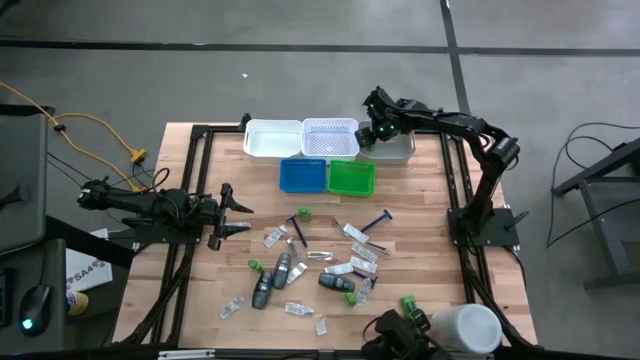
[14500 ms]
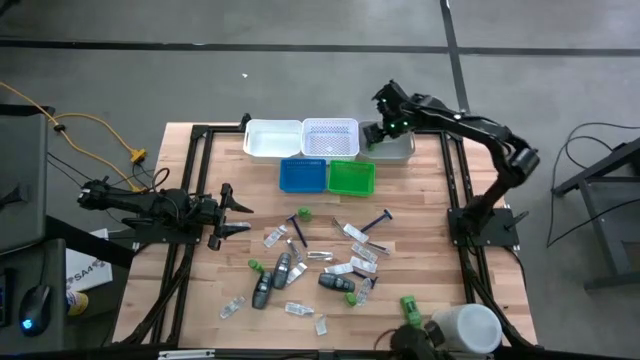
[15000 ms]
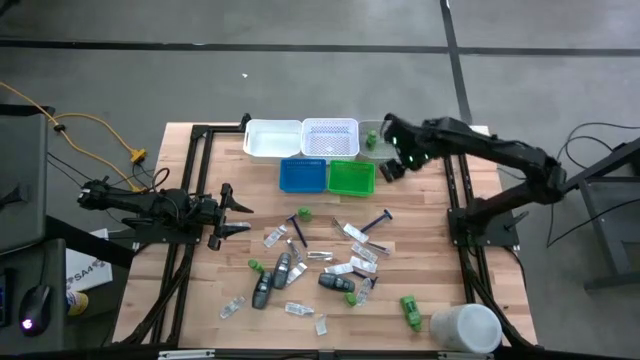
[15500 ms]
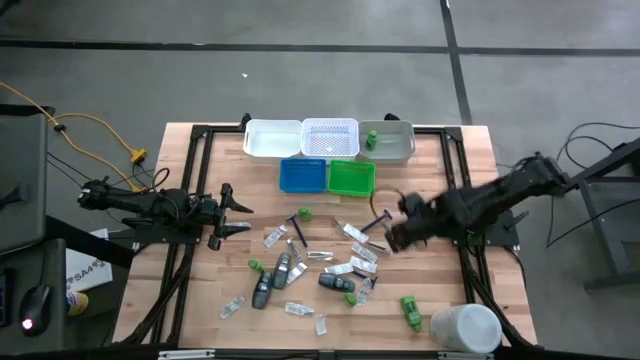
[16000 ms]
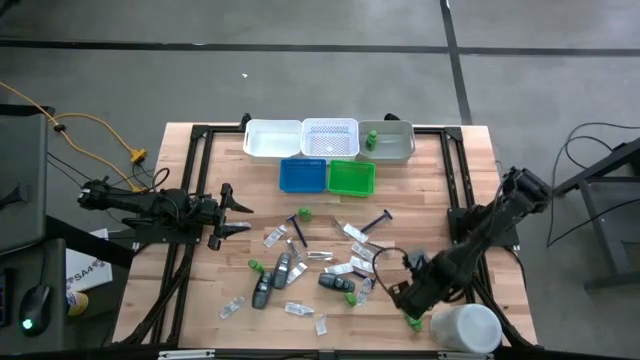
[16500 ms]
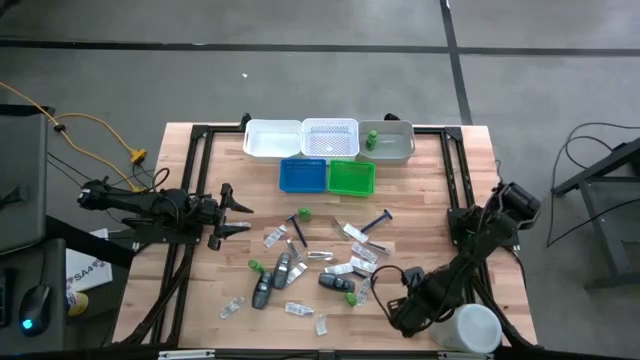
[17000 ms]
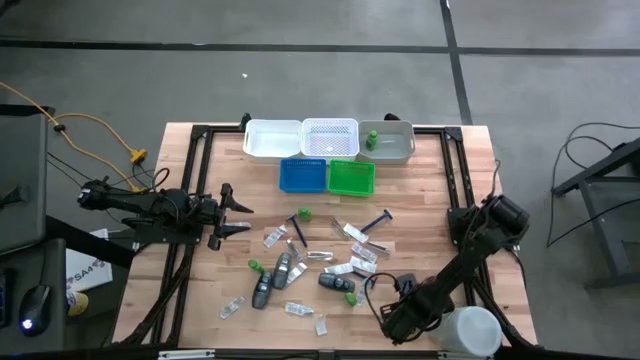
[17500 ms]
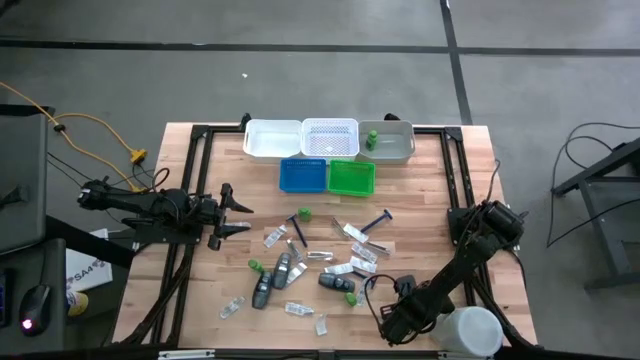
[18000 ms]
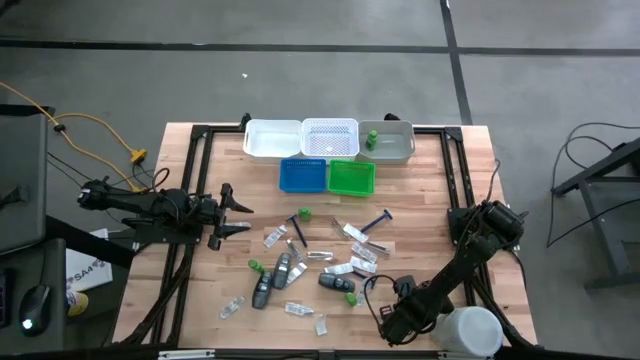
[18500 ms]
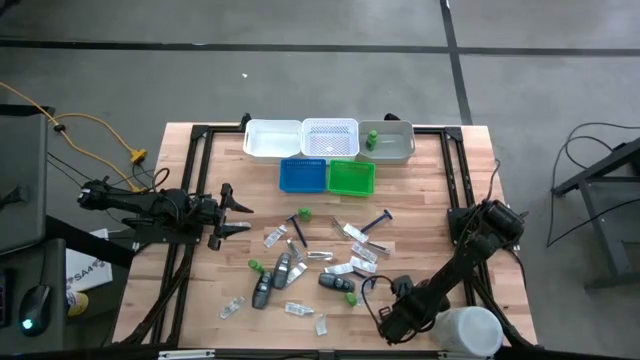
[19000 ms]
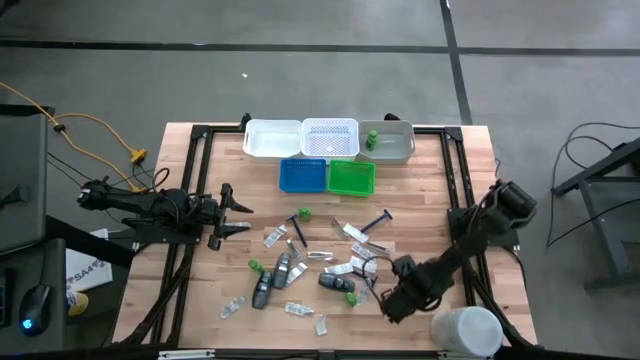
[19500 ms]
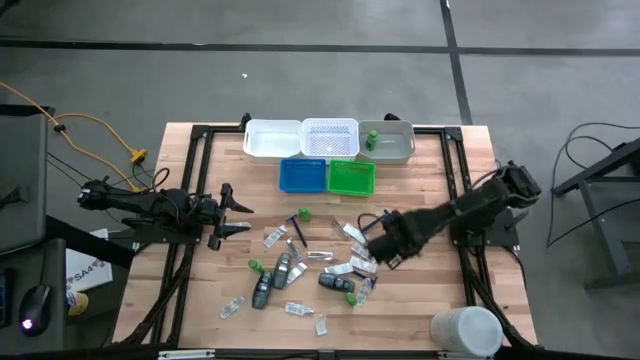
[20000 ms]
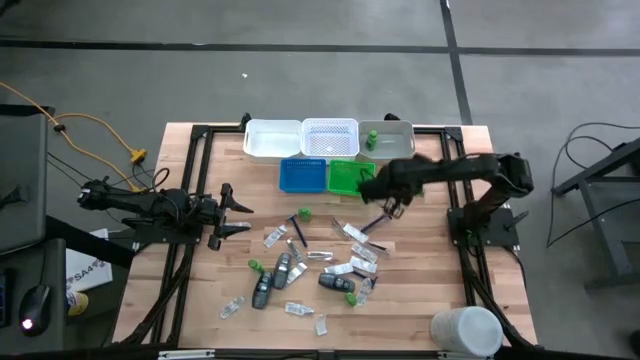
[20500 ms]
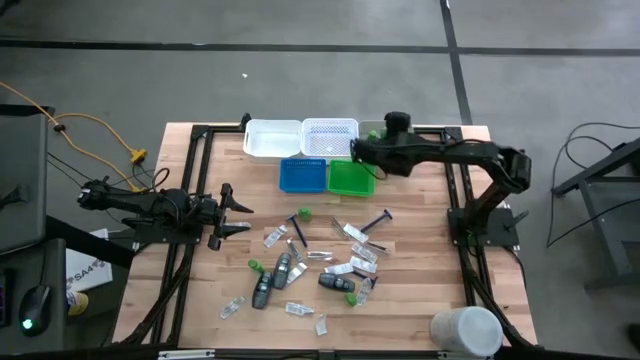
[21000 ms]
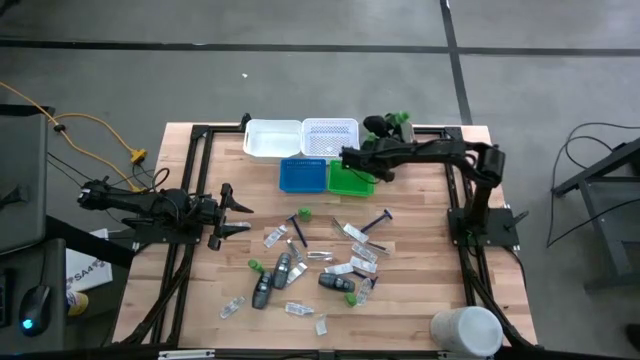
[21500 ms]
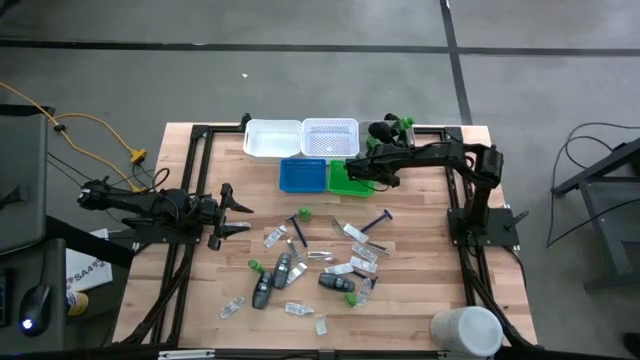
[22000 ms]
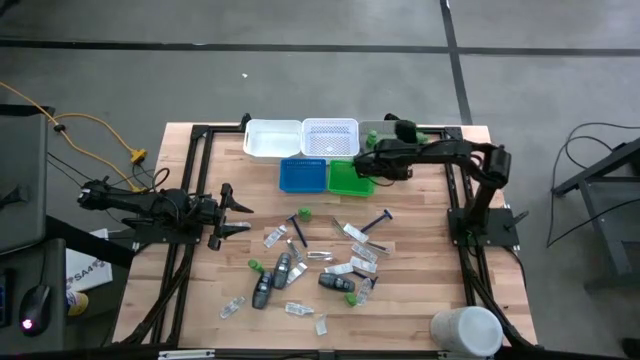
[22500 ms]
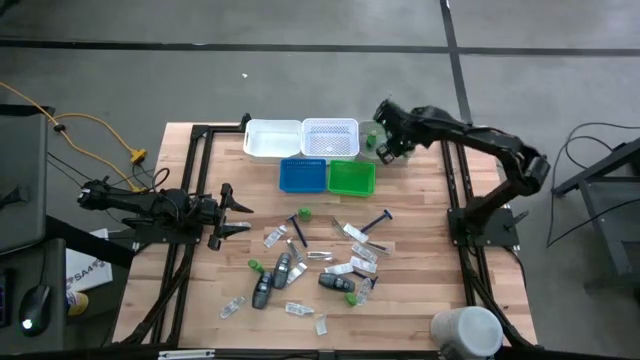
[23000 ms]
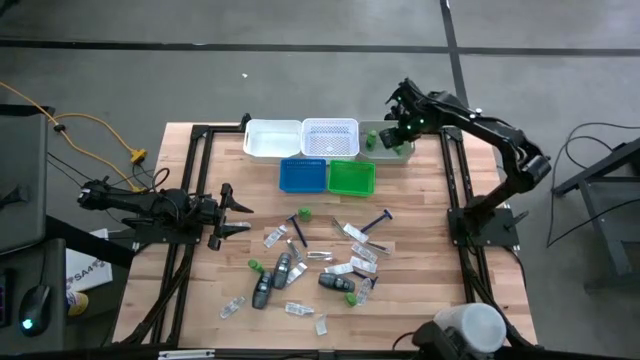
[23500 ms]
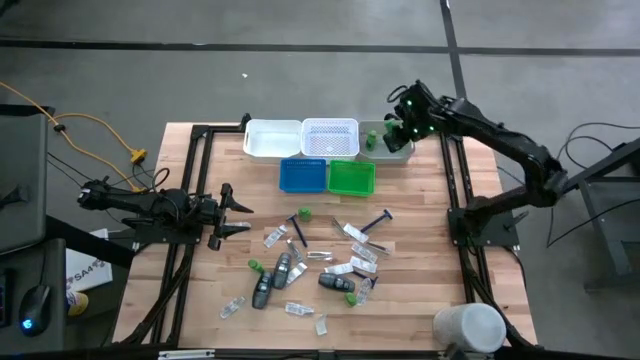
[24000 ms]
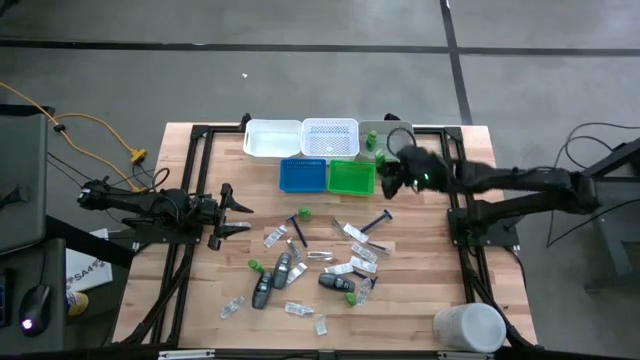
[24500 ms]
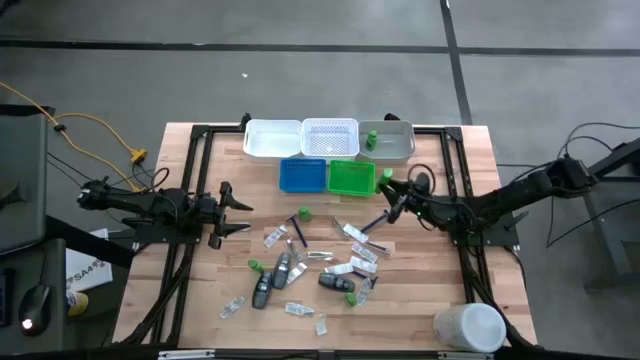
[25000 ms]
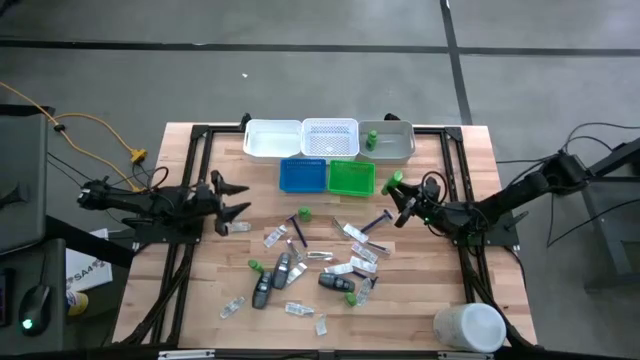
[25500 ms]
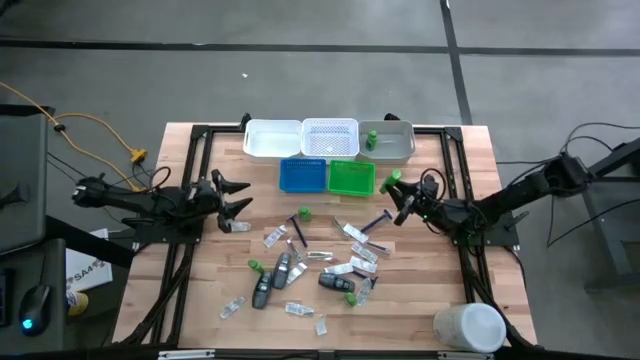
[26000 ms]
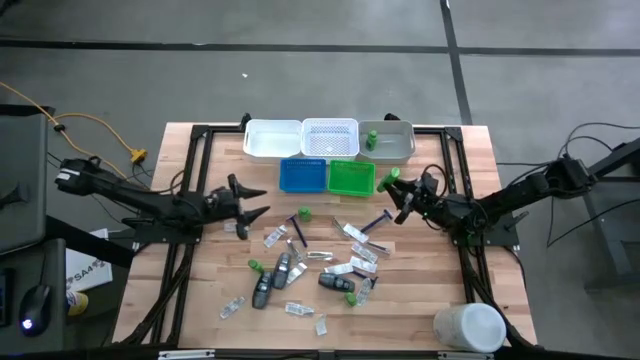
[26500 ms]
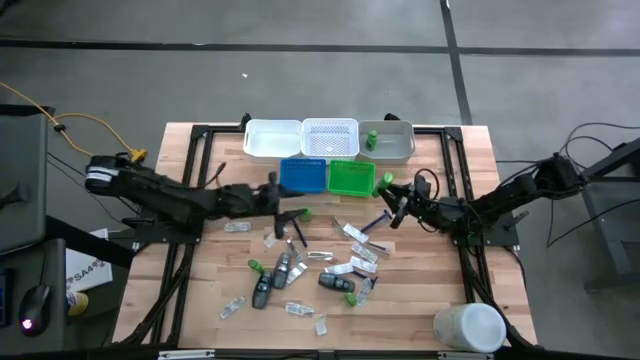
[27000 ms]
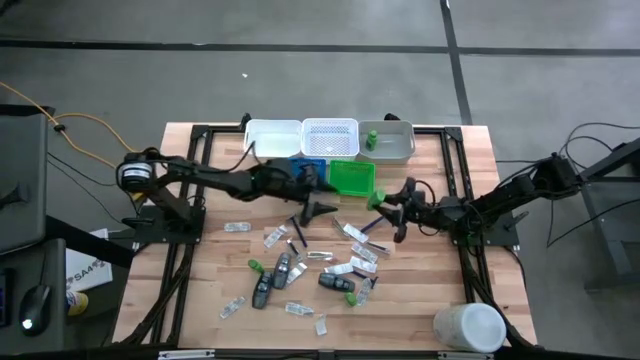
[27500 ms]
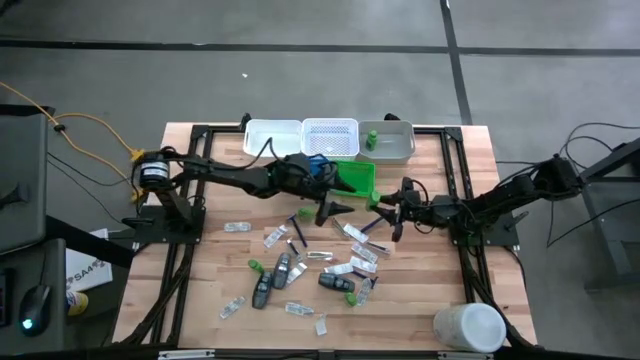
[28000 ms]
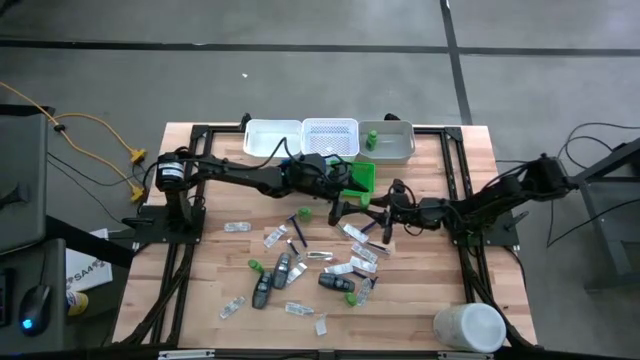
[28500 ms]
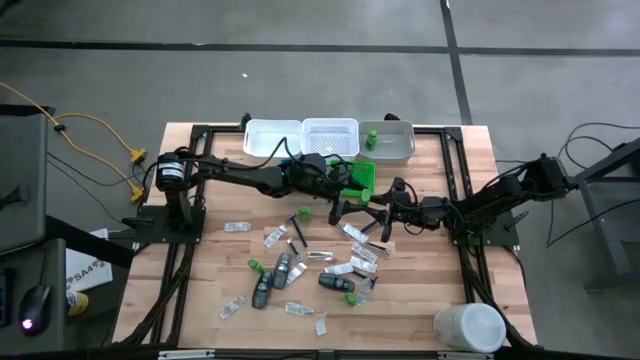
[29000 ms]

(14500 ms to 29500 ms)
Task: Pick & Place Travel size toiletries
Put the green shampoo bottle into the gray bin

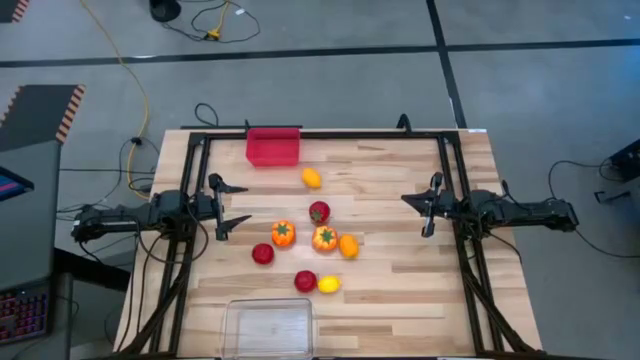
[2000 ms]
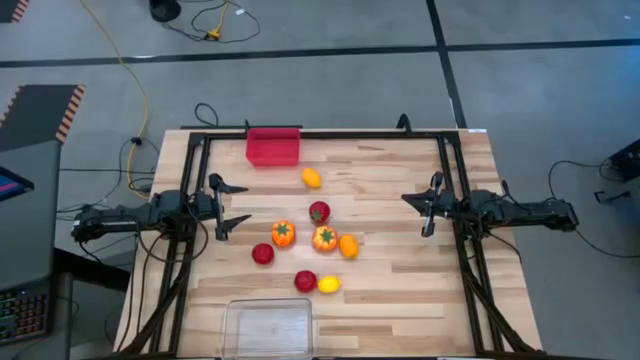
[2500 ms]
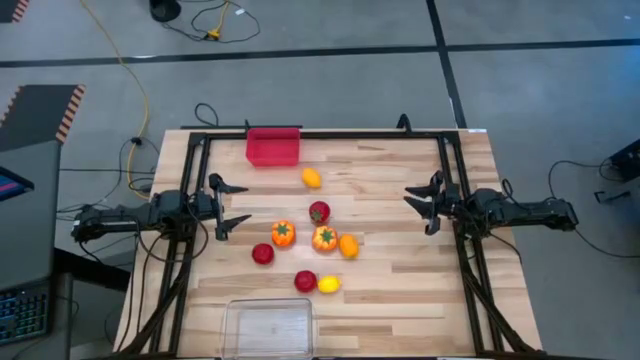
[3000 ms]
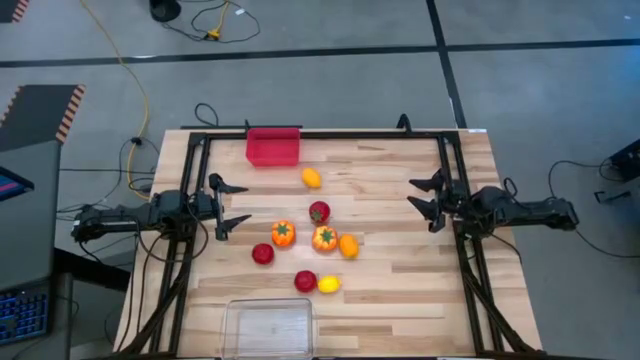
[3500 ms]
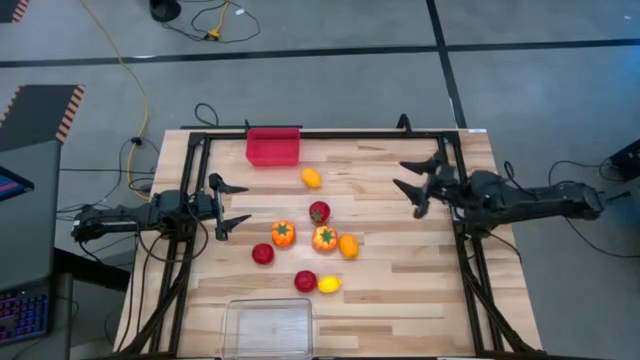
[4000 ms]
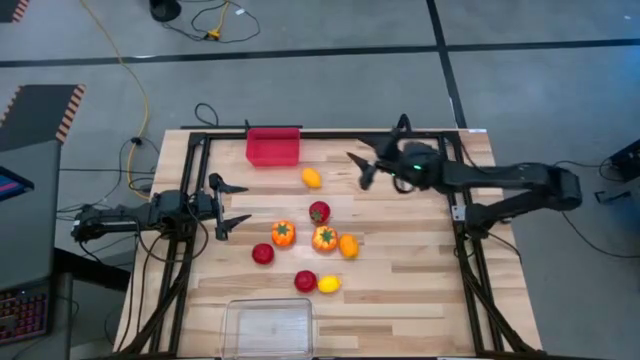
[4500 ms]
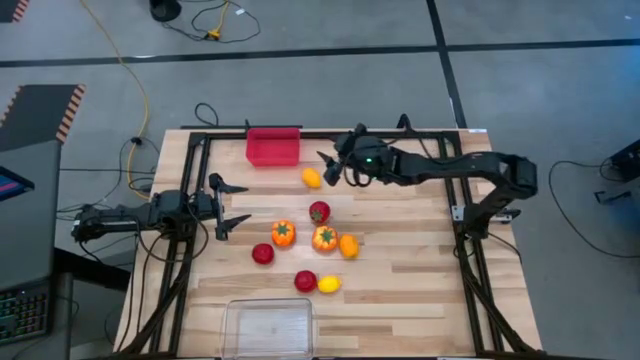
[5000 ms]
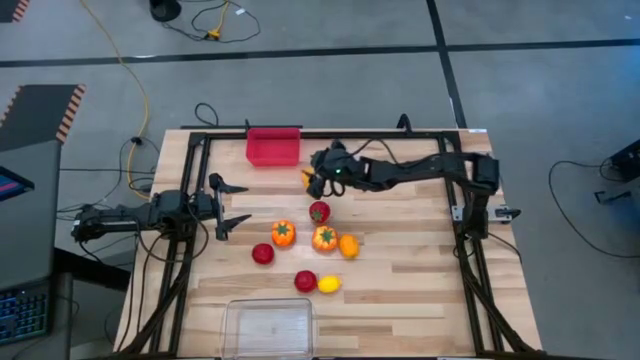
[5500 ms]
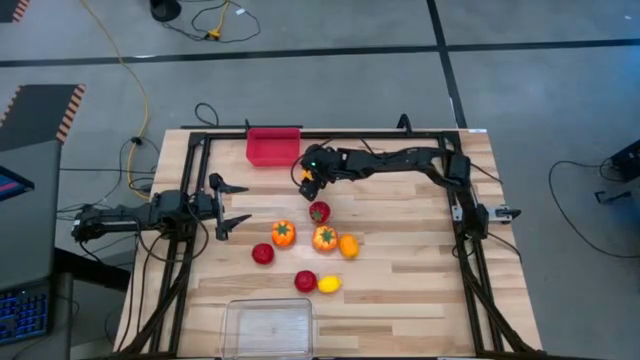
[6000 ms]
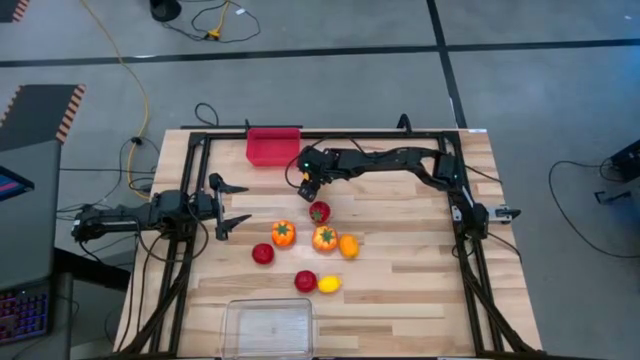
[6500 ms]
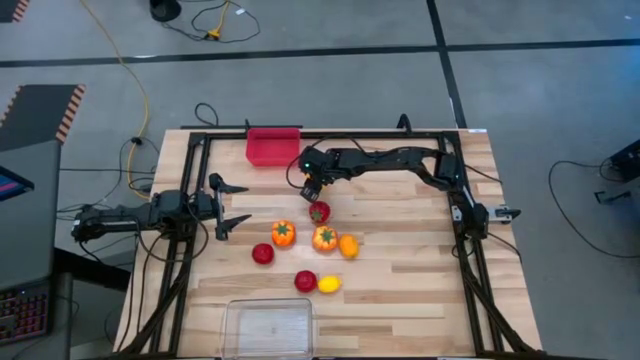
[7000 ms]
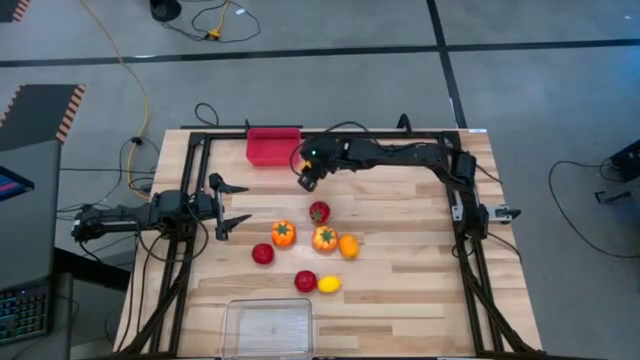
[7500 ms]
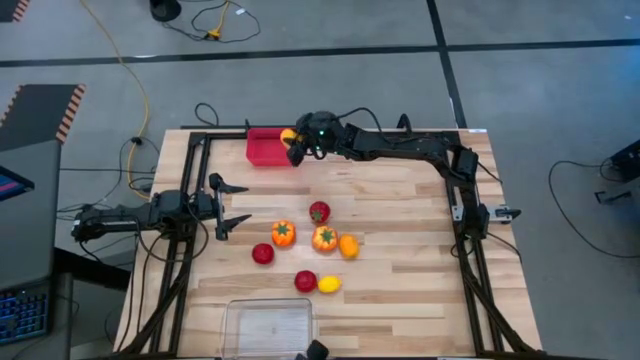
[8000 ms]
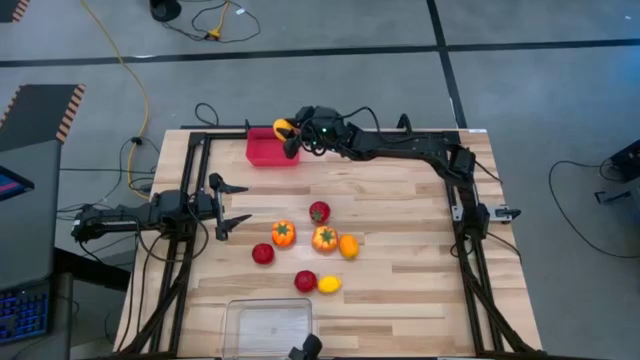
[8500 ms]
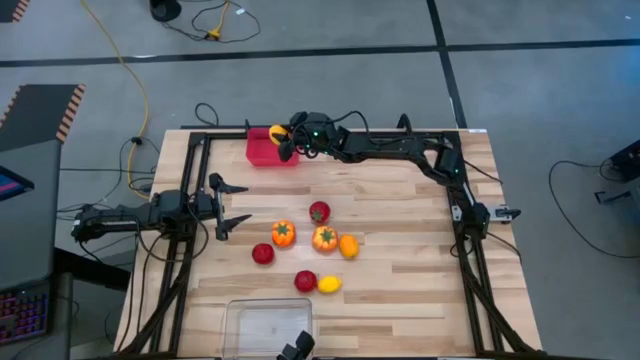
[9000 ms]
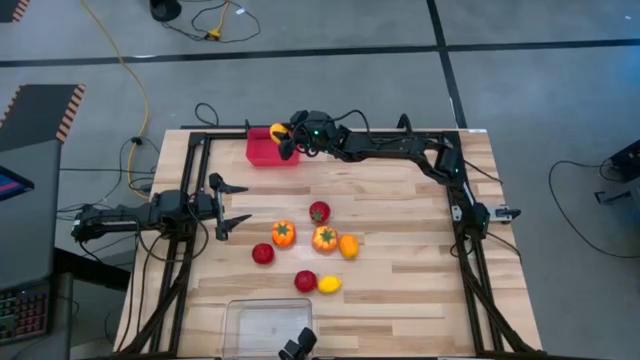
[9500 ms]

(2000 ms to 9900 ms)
Task: Sort produce into baskets
Put the top yellow lemon into the red bin
